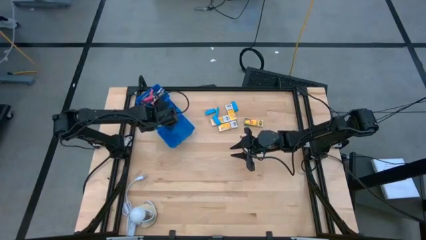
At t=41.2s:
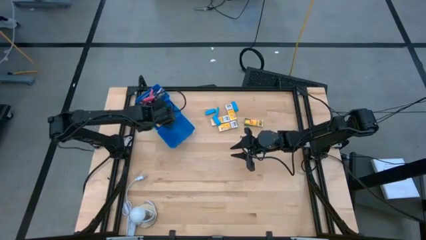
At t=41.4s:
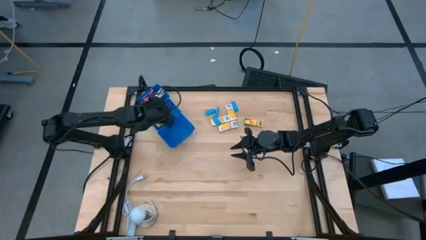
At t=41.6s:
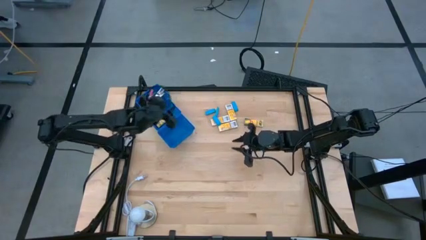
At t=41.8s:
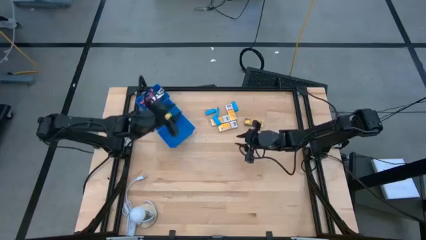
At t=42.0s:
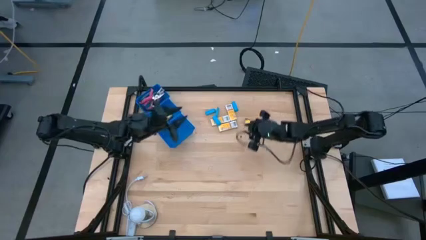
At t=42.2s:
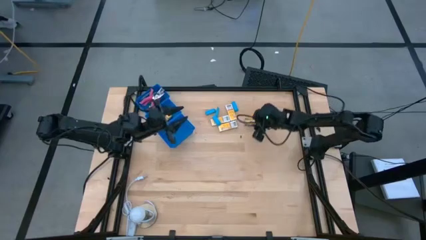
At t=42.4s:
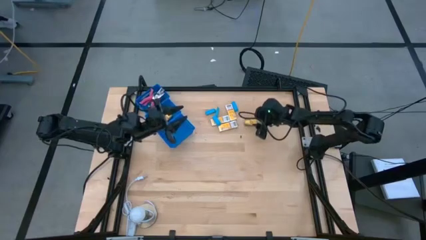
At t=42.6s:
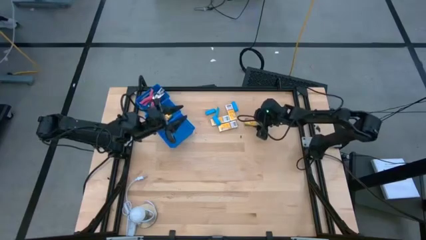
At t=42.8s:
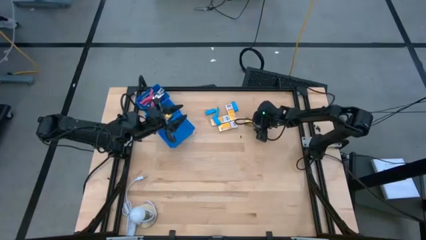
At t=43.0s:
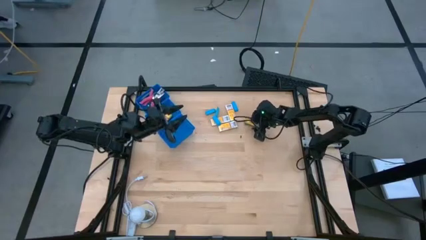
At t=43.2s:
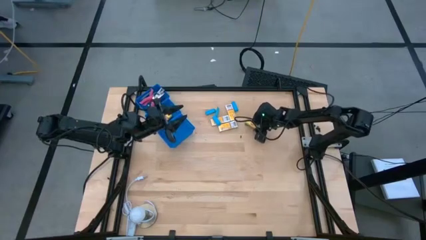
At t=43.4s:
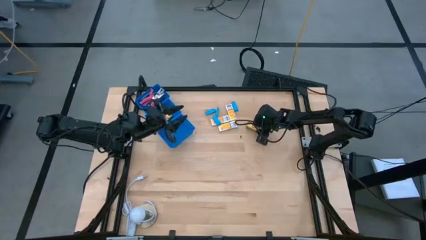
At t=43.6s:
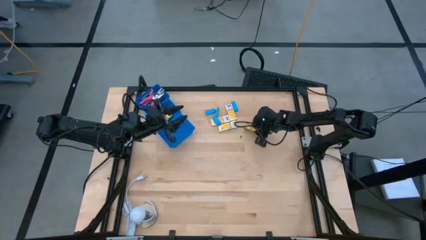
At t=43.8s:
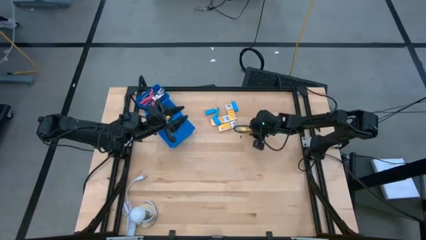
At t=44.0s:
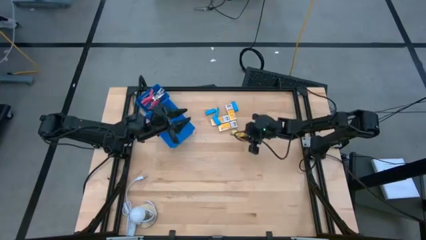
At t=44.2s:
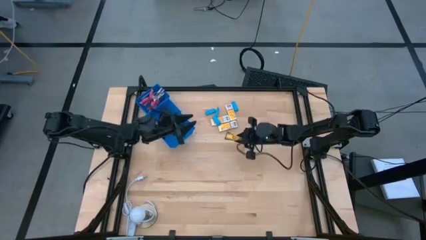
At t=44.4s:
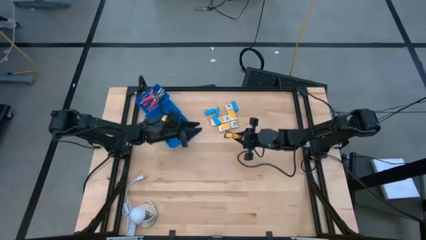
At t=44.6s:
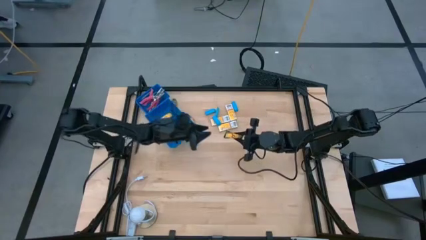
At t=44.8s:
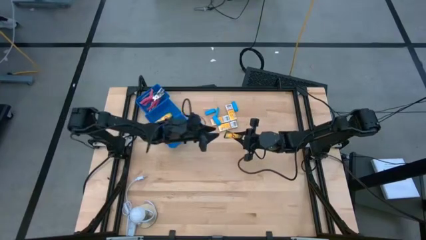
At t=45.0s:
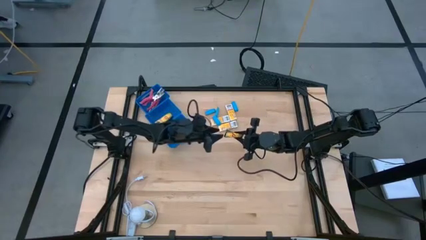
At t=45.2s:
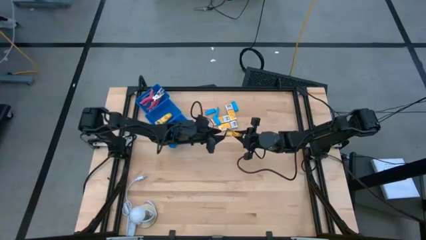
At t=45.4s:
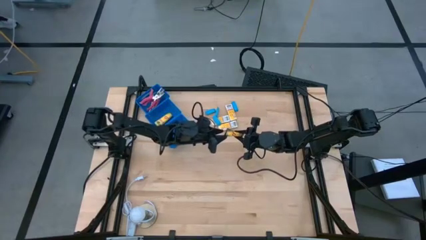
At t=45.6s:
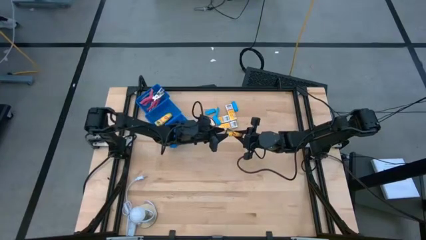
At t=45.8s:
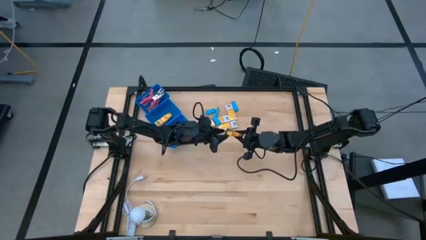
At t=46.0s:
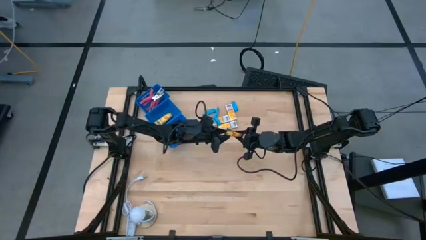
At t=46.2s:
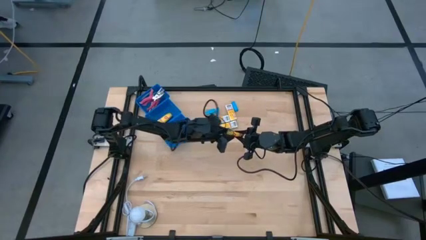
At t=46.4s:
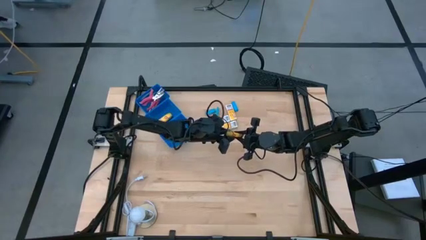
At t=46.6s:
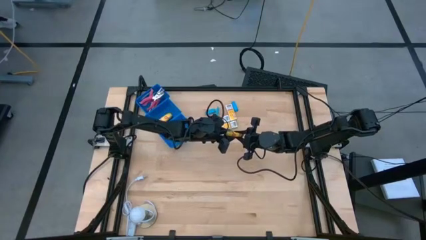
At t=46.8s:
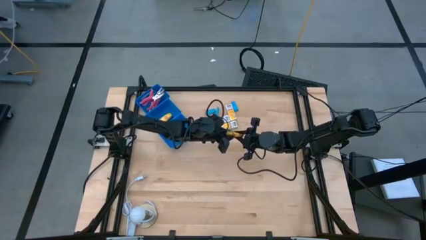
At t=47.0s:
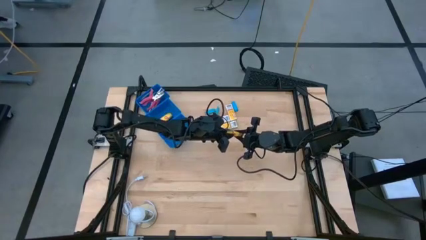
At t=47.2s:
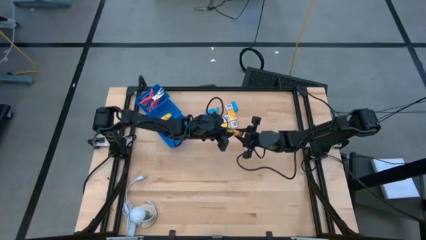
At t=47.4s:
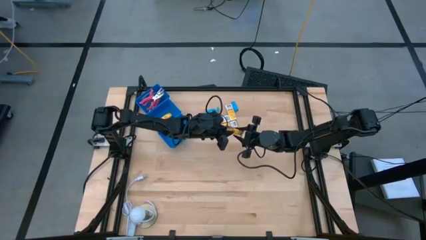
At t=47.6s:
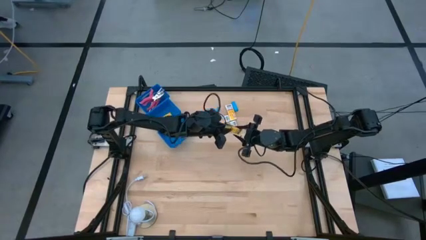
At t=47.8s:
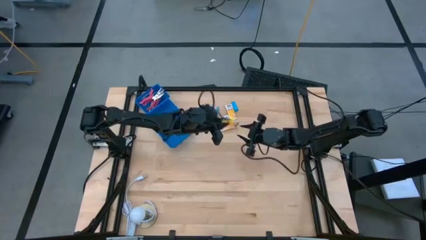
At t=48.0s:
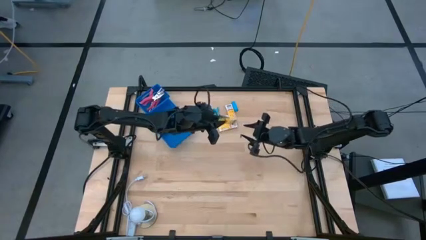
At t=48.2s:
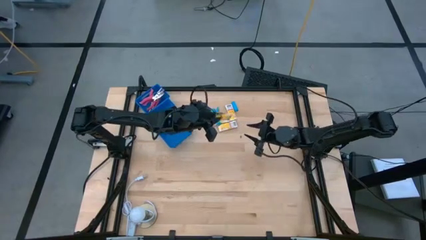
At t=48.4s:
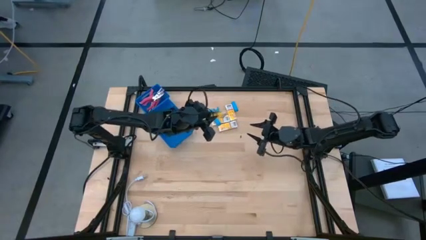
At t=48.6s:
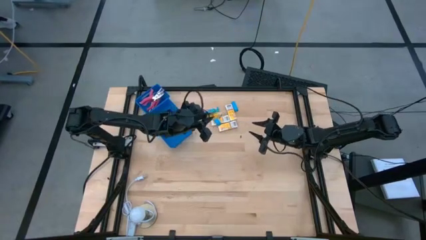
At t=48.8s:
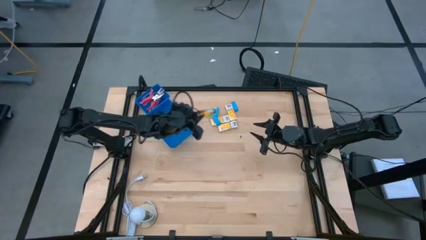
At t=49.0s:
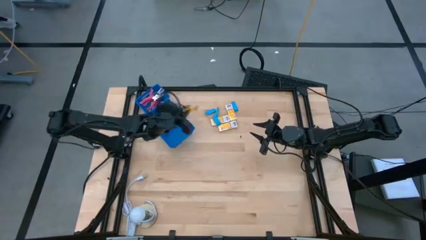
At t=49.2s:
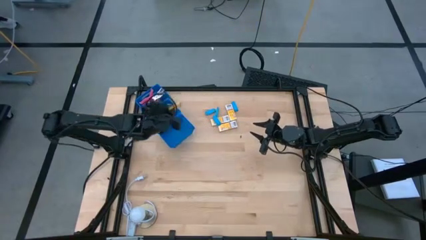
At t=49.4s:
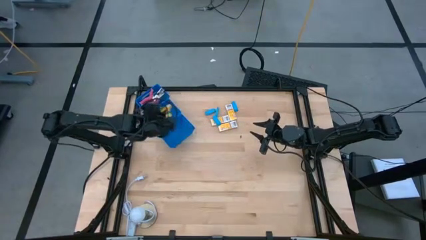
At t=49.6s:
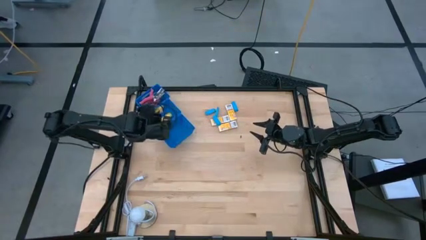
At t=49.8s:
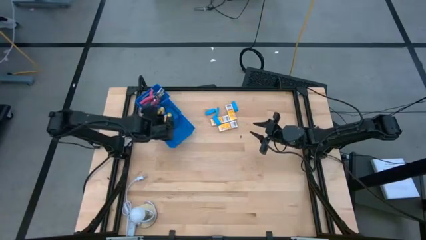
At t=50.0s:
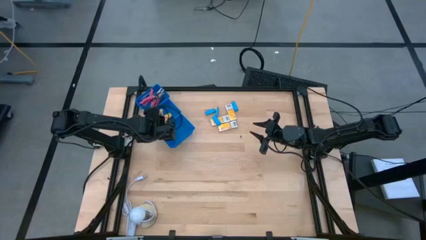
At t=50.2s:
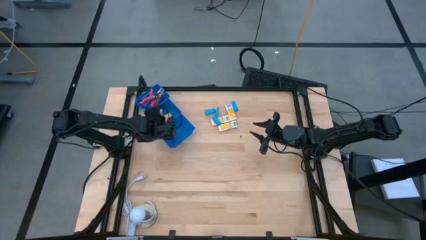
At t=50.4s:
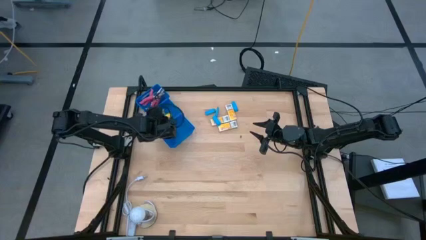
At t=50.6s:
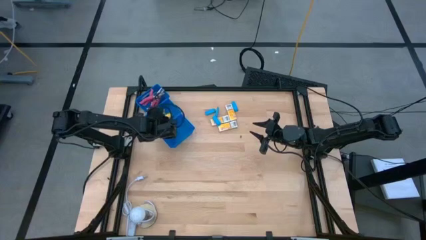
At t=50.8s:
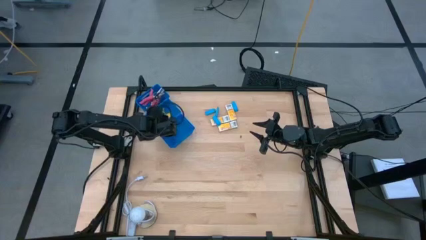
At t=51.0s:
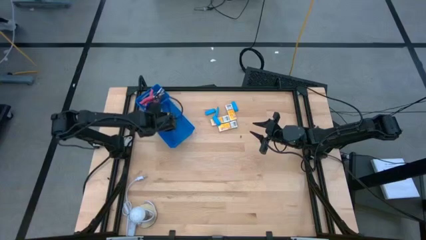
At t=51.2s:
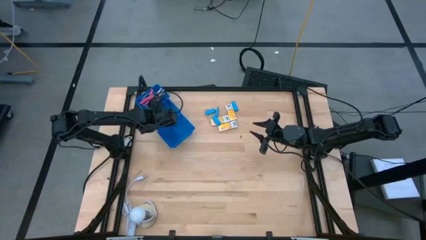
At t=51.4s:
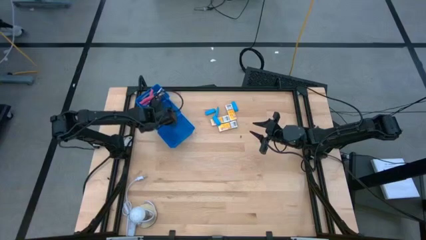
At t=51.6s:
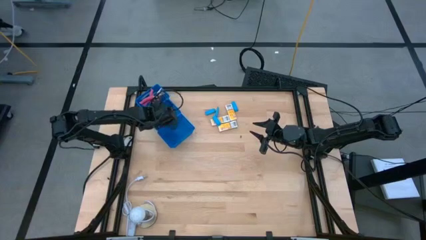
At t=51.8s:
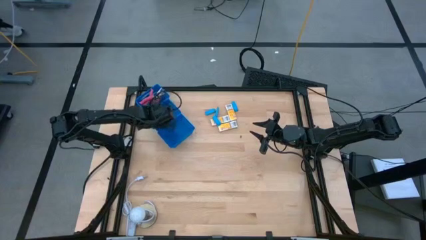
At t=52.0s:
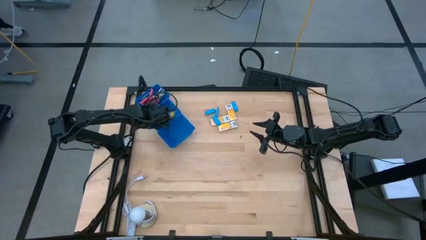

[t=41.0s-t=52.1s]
Task: Pick & Place School Supplies
Put the yellow crayon box into the middle blue bin
